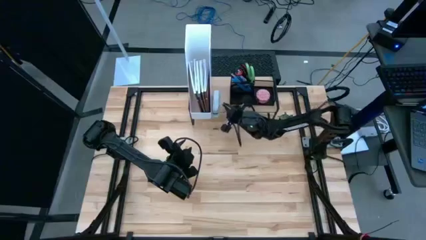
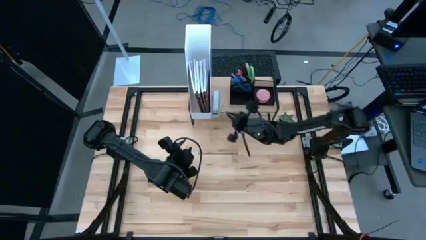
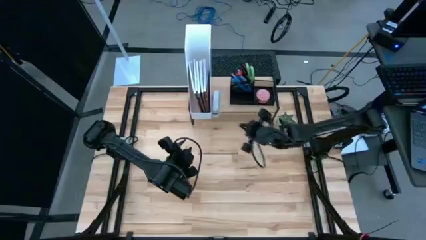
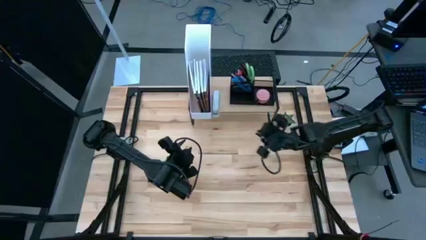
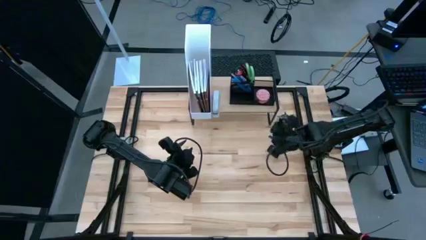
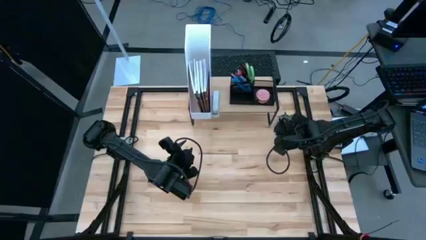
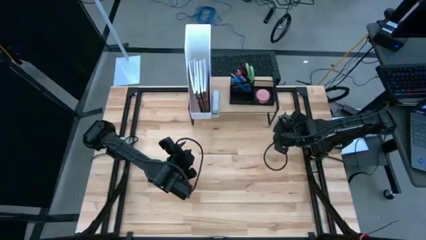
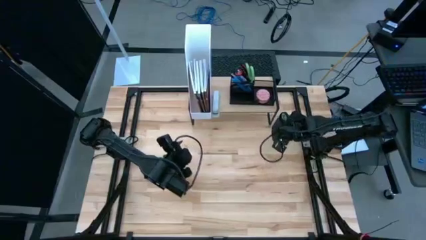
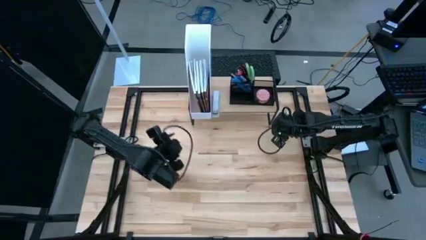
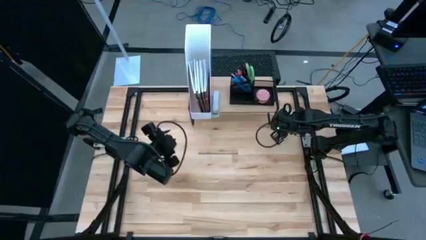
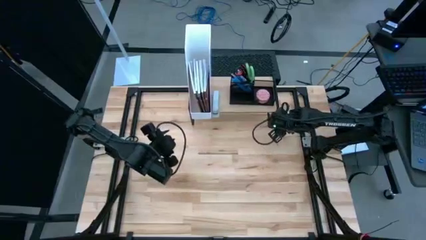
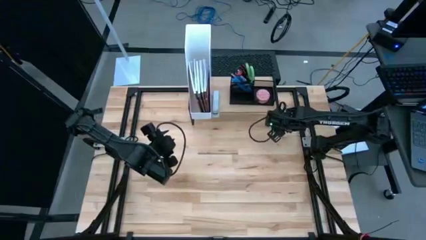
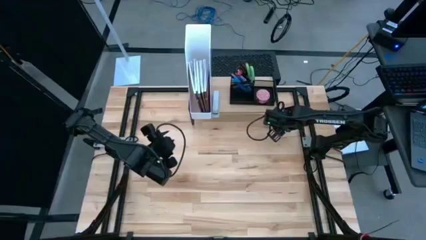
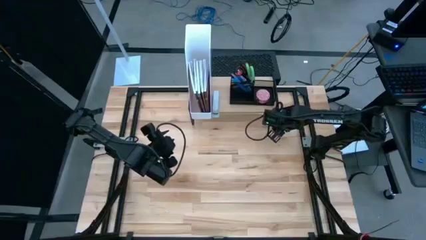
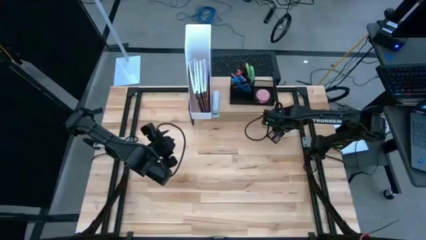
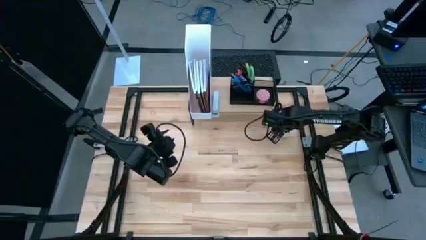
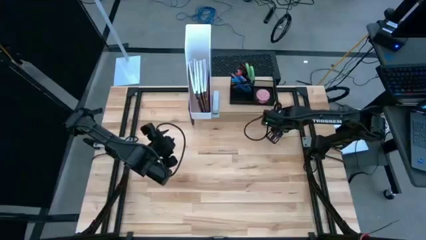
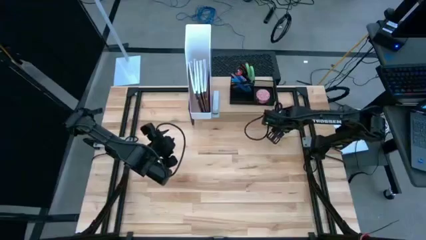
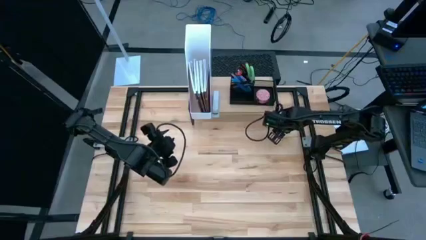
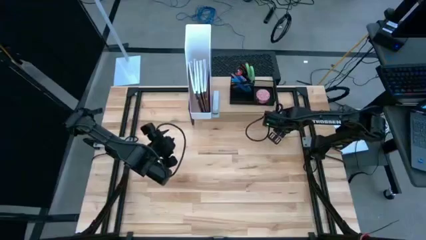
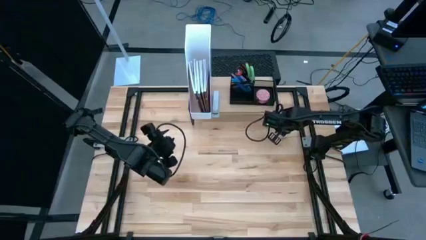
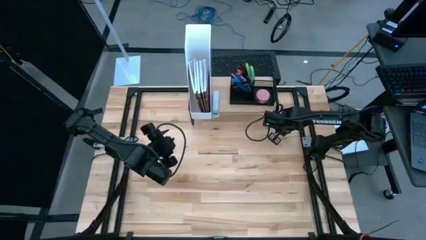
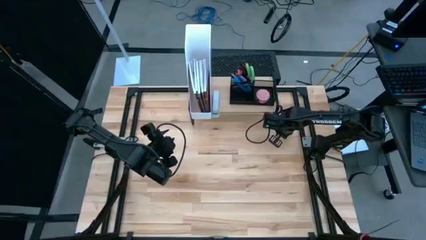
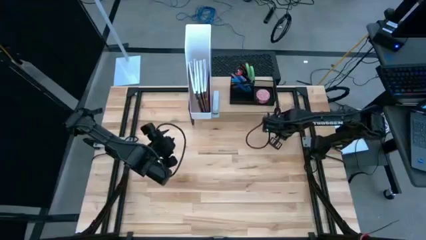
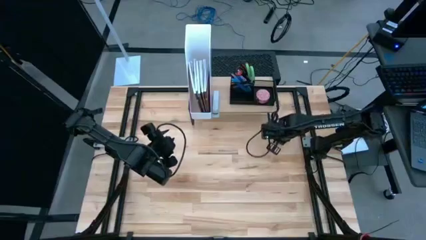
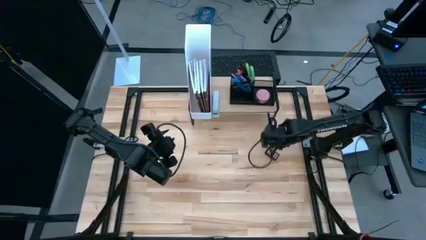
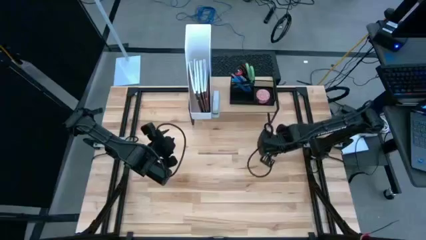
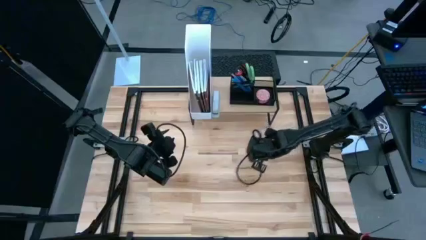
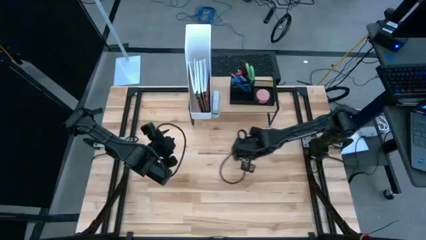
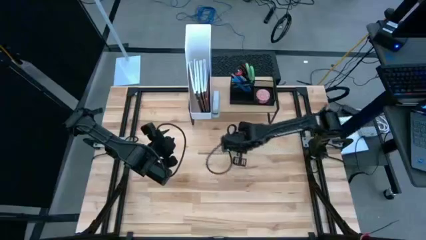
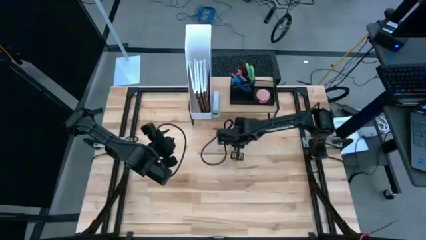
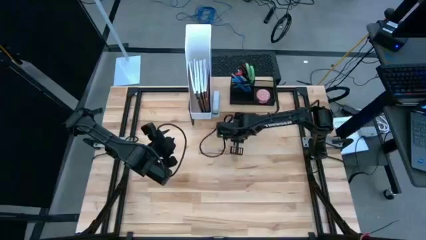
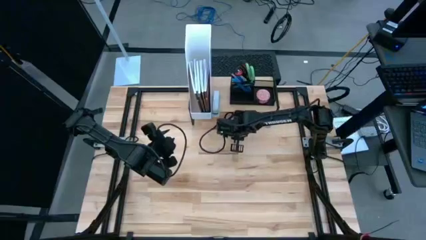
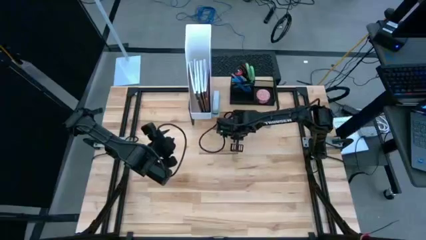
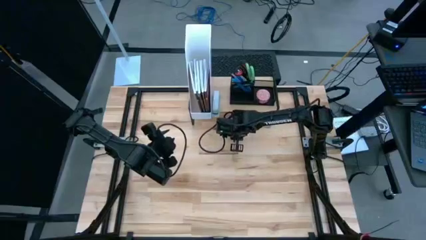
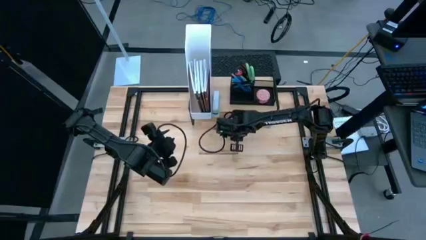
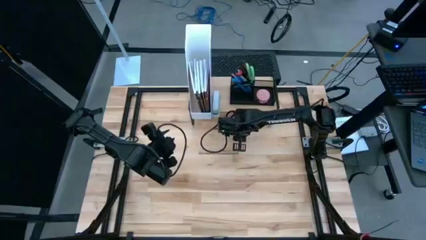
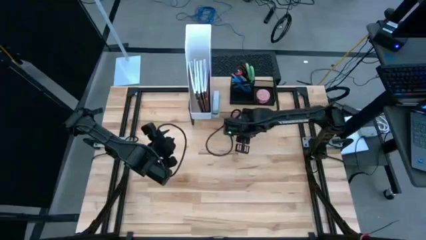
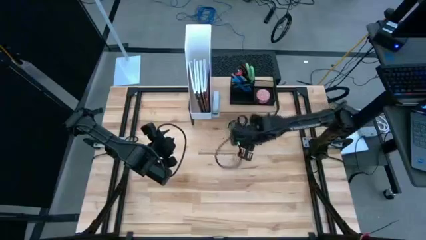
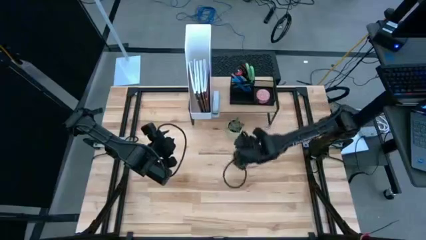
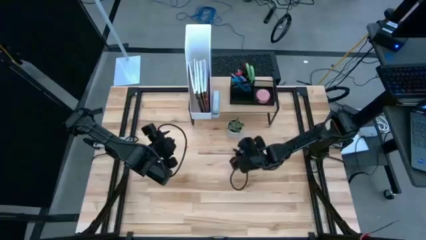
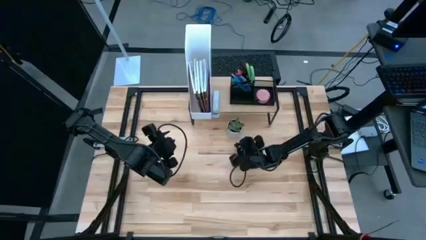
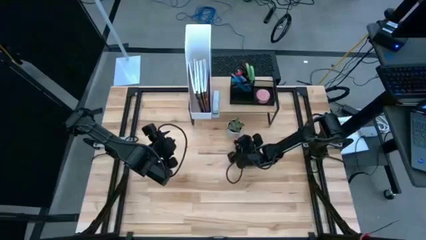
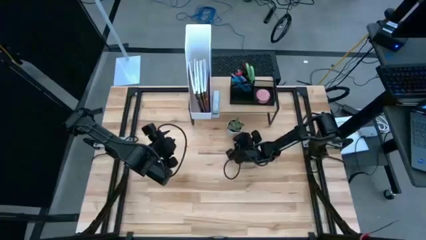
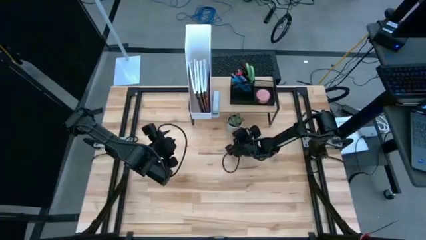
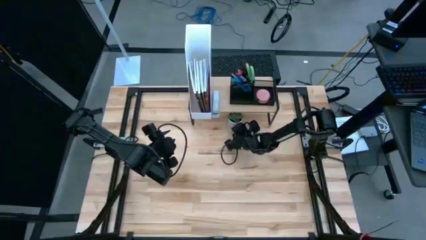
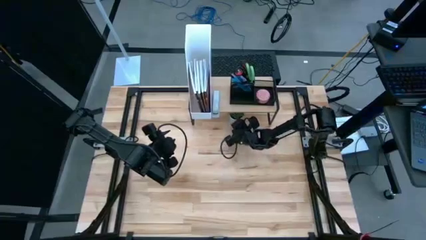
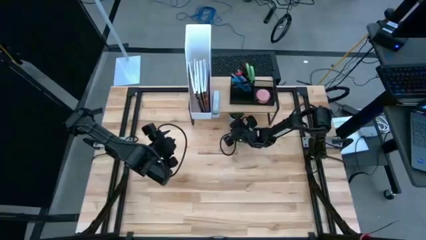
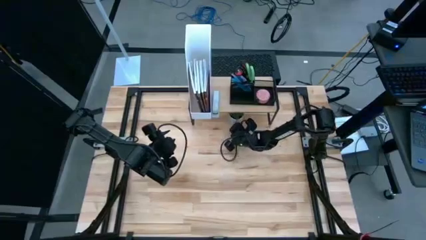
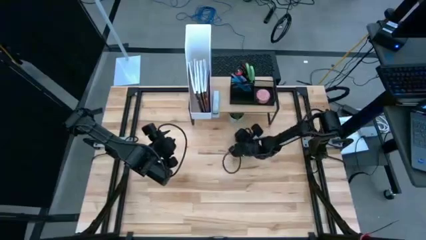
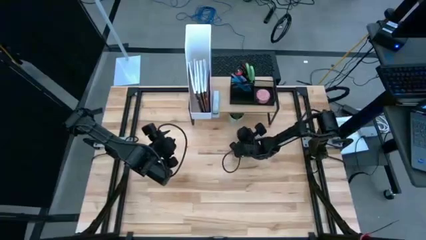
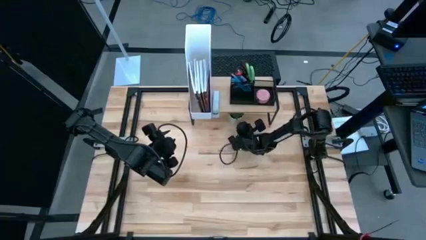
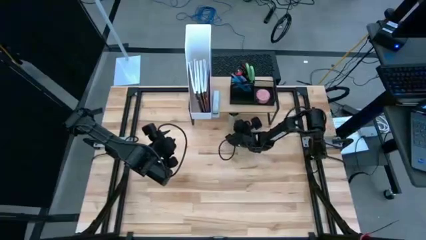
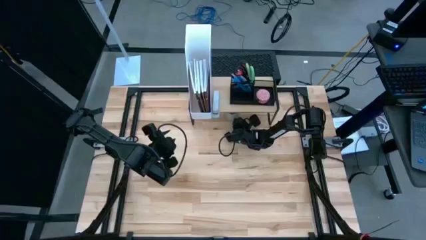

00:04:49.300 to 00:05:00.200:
Task: Stock shelves
Put the white potted plant under the shelf

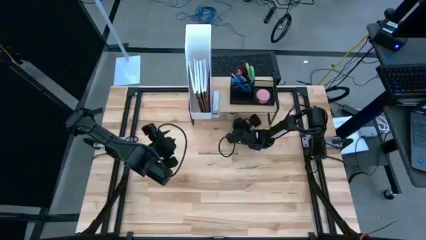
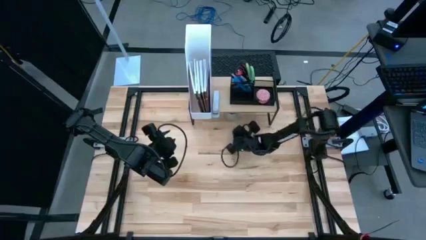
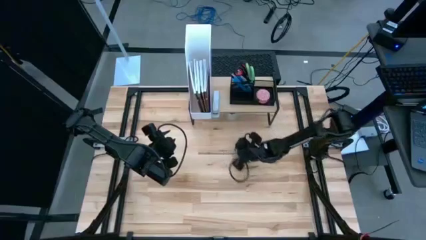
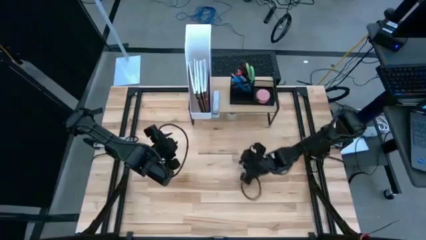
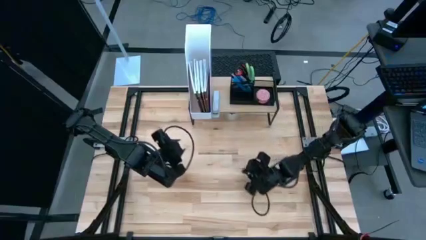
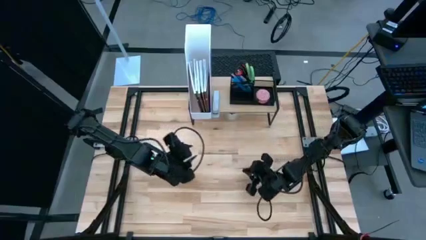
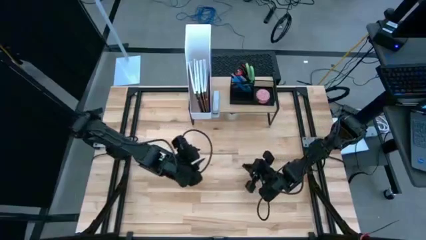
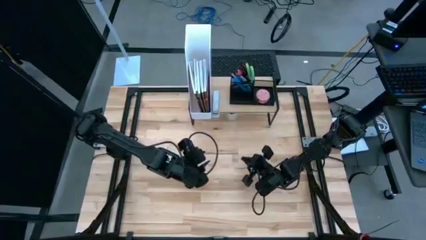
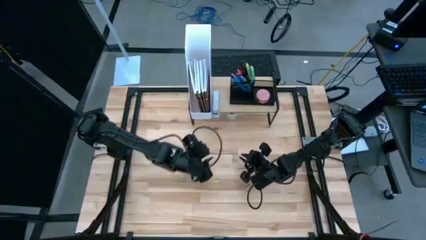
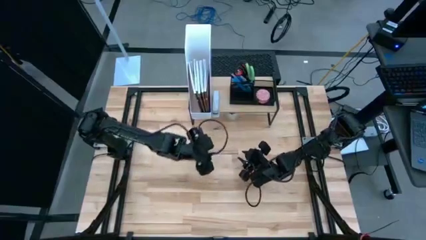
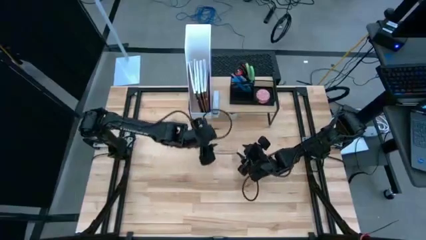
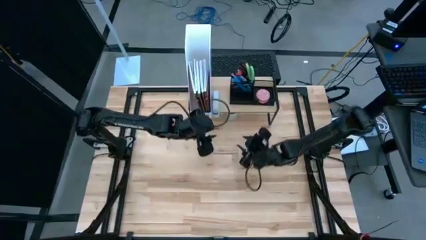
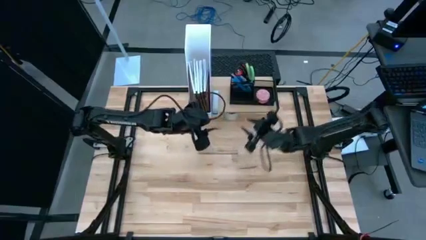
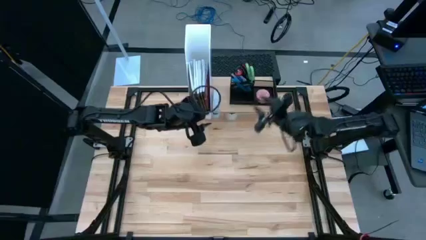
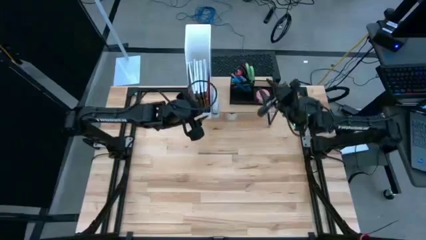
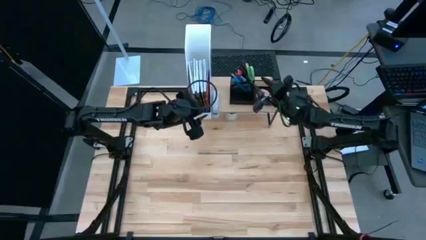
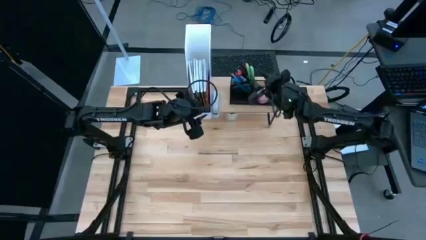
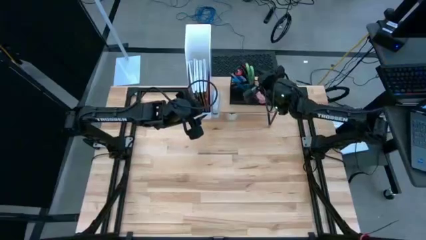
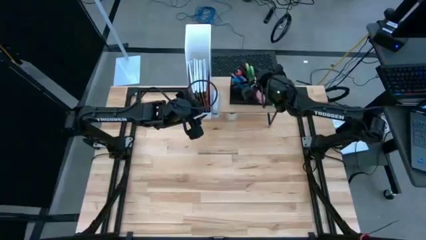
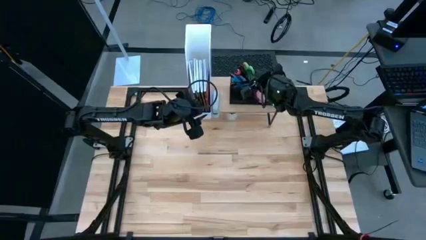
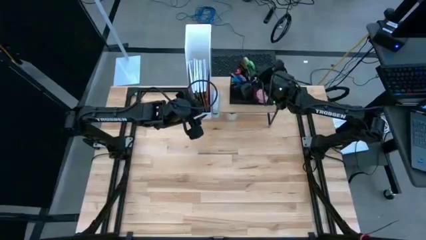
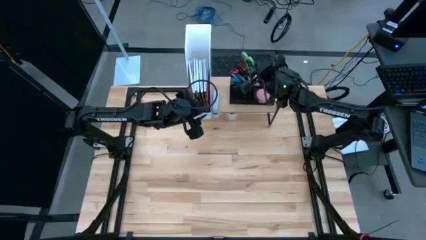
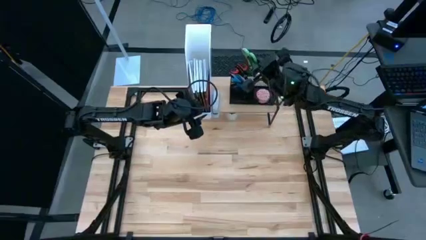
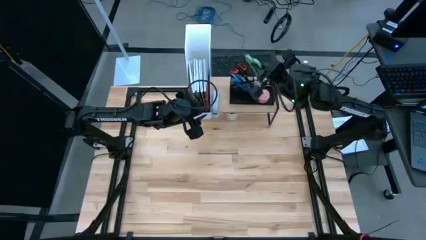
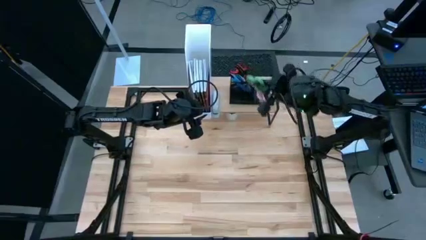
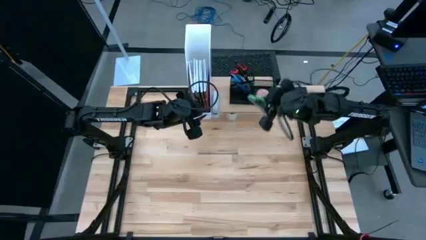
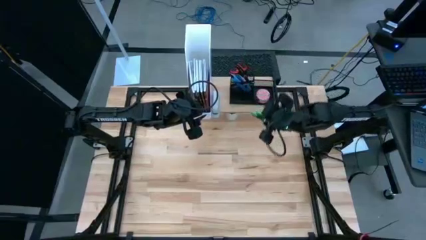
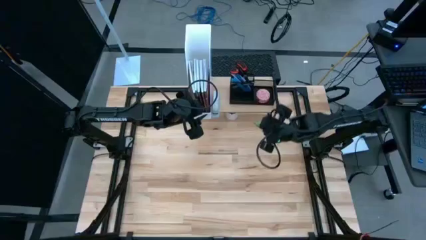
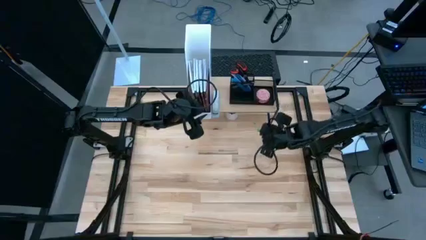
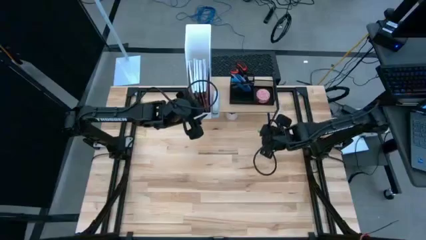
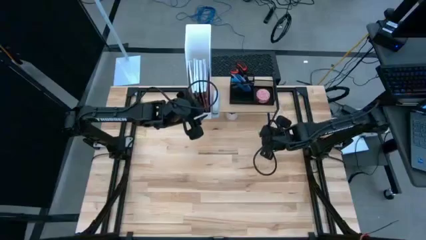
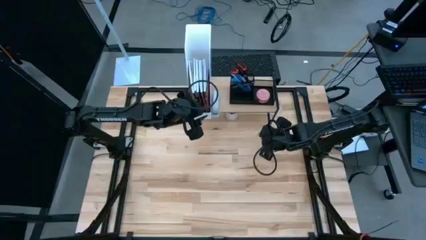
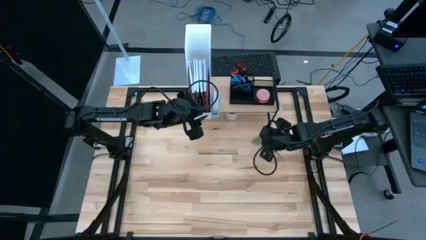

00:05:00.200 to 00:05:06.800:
Remove the green scissors from the desk organizer
